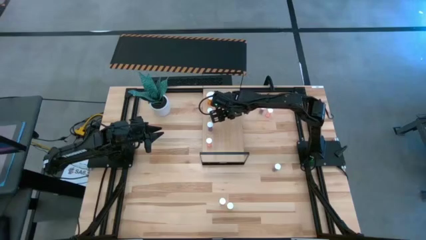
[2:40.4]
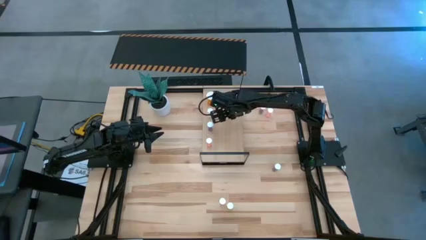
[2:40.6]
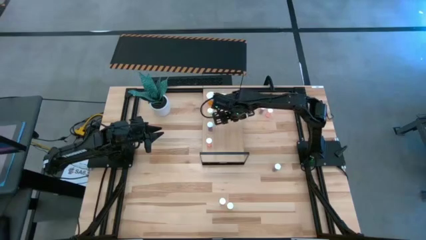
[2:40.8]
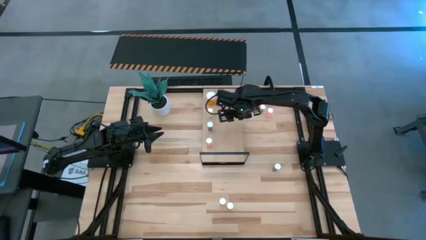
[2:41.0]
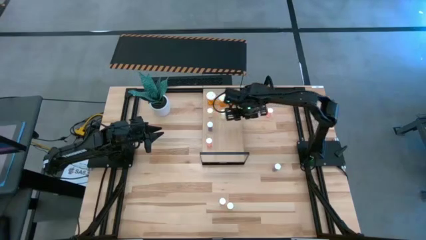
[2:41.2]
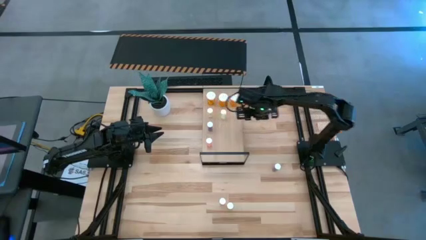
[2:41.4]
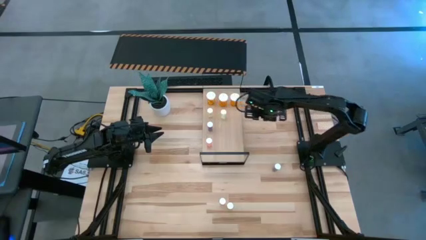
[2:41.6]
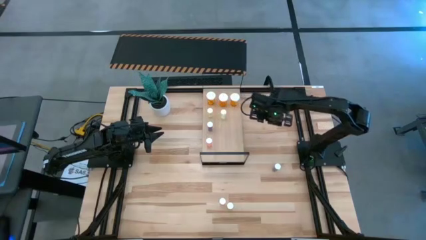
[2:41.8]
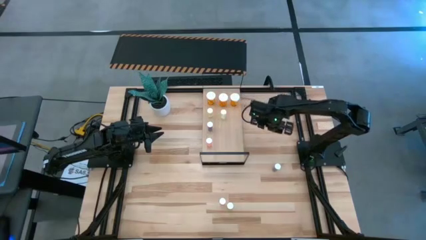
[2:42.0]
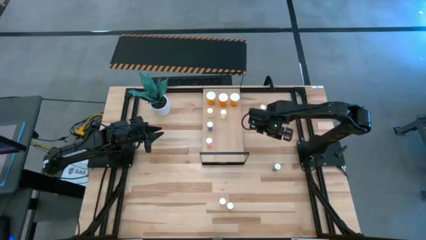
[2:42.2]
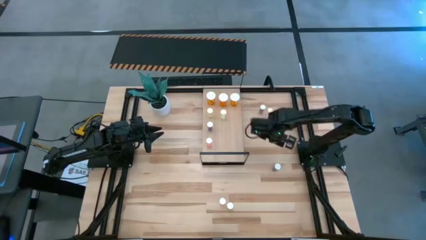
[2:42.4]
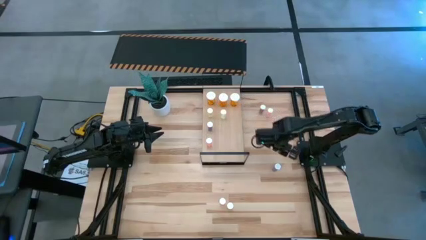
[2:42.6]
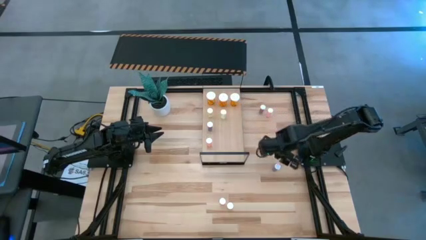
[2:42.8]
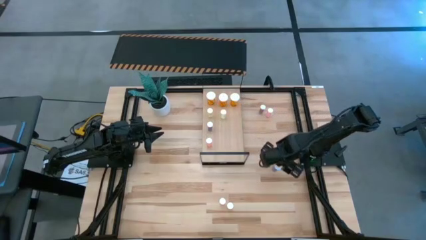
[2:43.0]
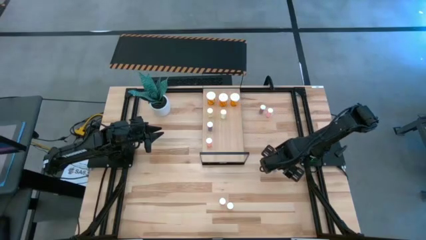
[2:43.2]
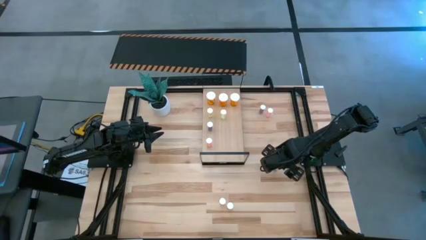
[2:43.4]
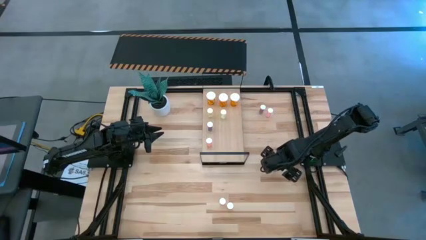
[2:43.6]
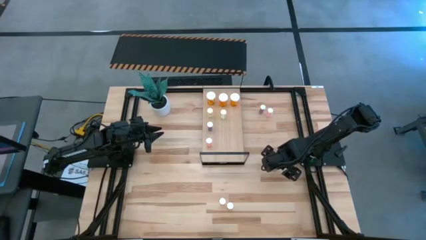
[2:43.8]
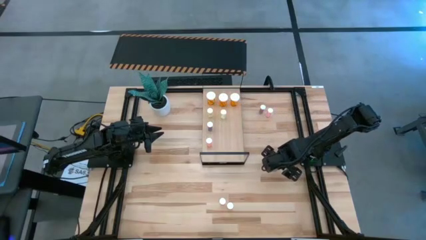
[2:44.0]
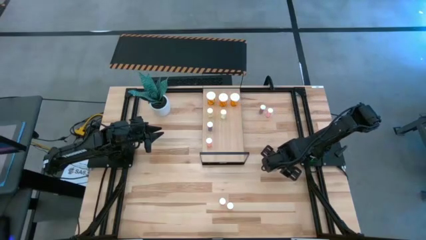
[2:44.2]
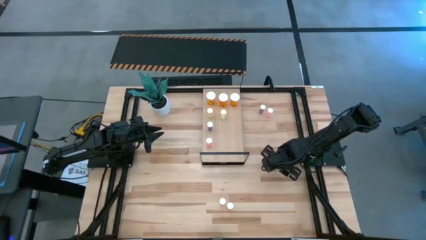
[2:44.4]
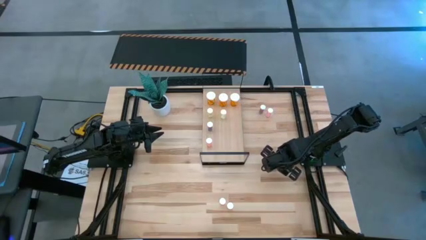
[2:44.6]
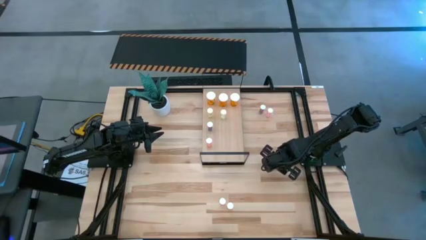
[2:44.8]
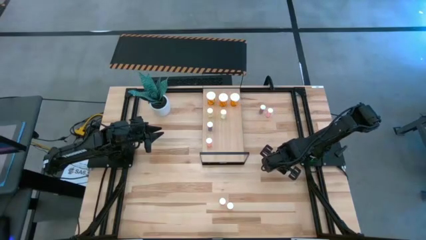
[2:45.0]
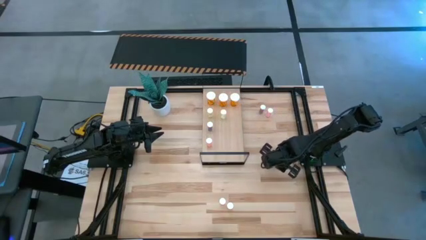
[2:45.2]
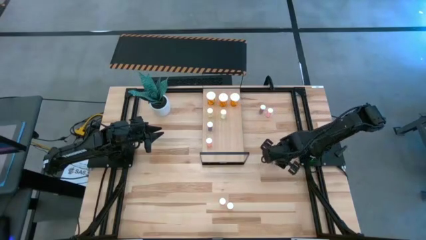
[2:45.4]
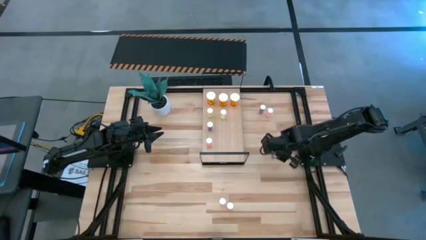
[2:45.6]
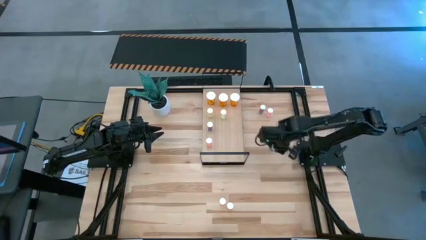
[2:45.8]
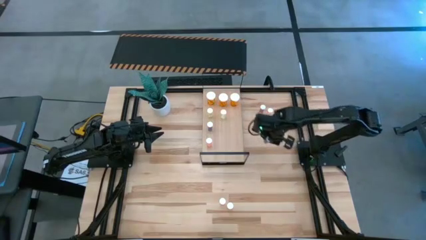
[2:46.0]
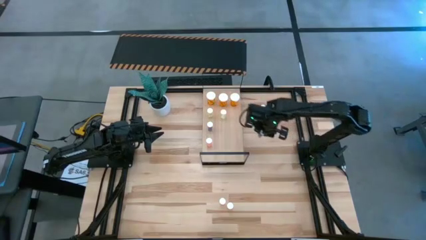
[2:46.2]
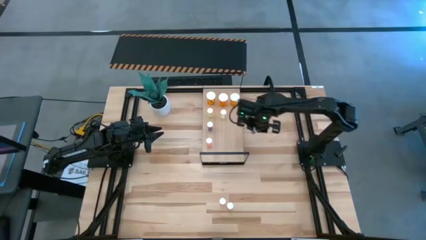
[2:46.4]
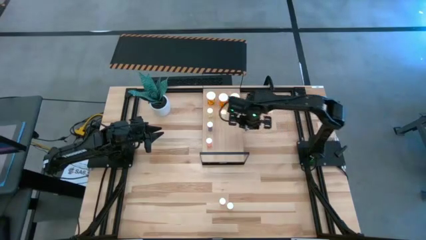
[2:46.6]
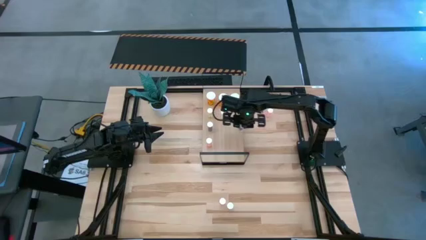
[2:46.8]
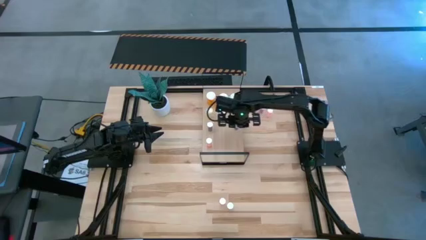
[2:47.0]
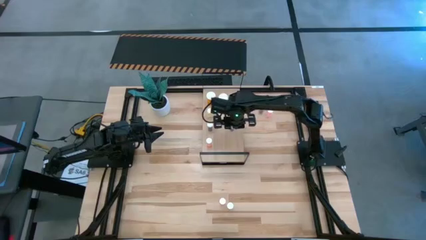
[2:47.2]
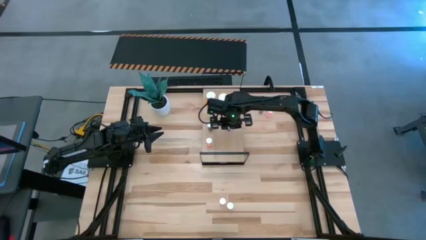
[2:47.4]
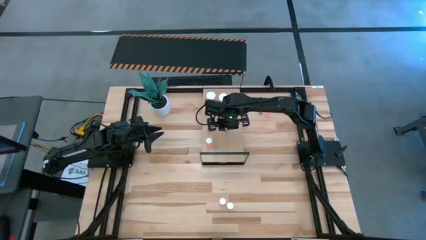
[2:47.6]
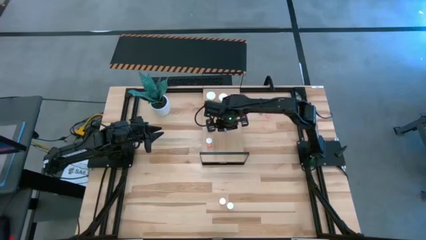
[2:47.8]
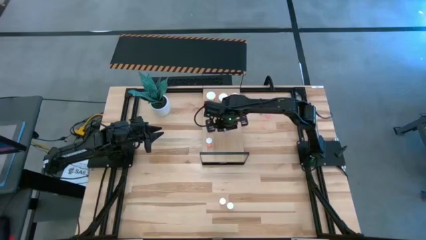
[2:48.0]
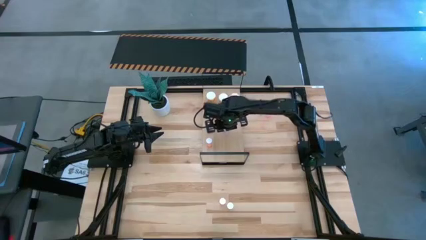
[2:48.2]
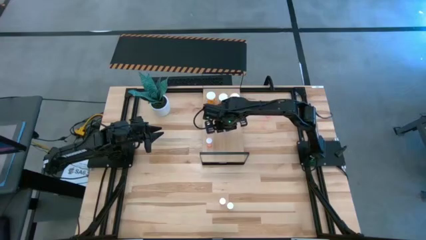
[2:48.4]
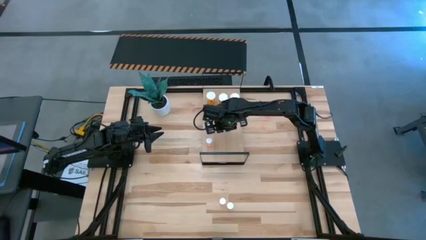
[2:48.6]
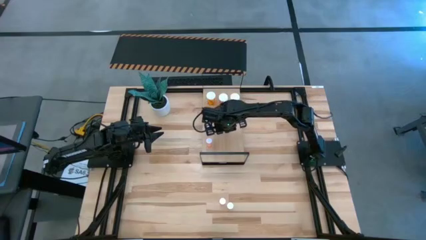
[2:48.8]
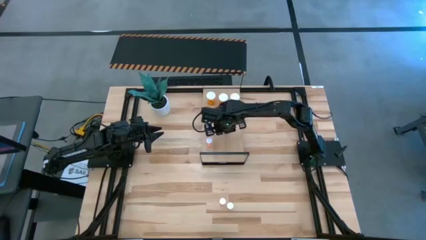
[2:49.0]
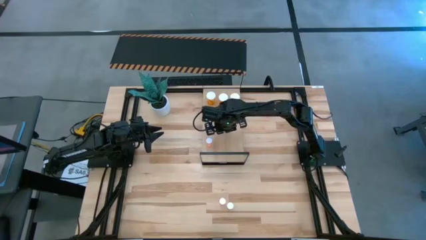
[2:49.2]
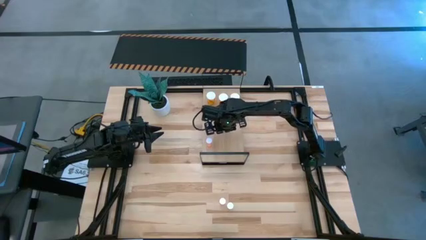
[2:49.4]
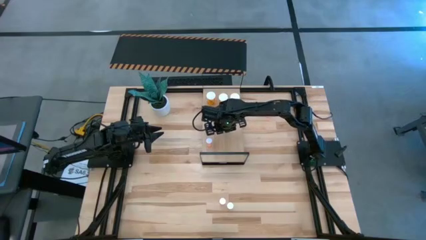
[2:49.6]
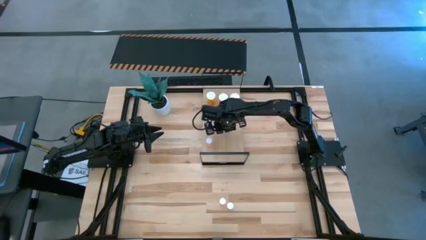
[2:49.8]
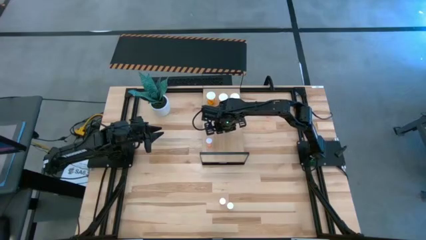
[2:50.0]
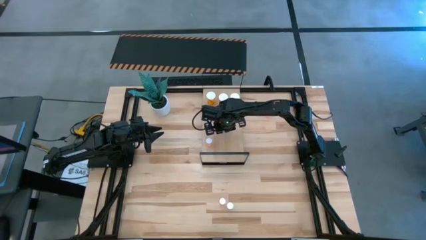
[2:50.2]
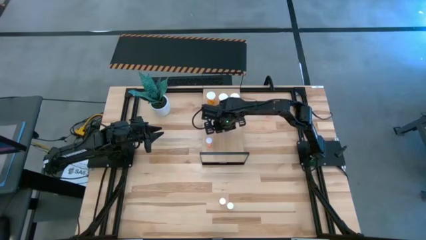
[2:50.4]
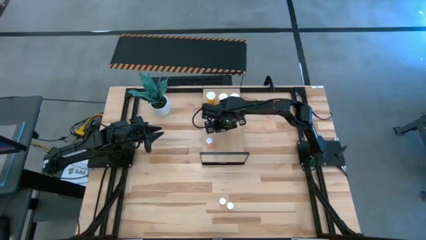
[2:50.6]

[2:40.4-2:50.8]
Task: Pick and place medicine bottles onto shelf by color
Put the bottom small blue pill bottle on the shelf aligned with the other small blue pill bottle

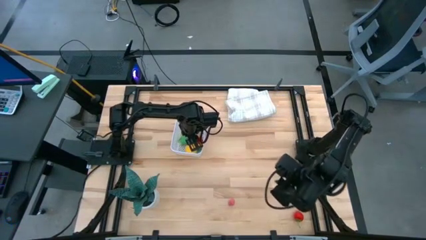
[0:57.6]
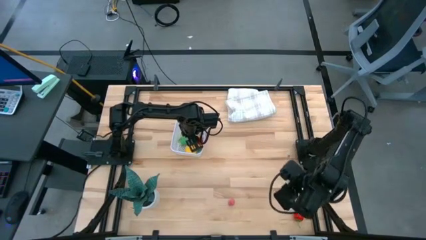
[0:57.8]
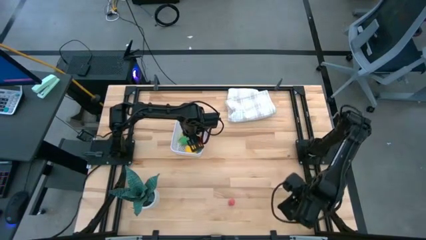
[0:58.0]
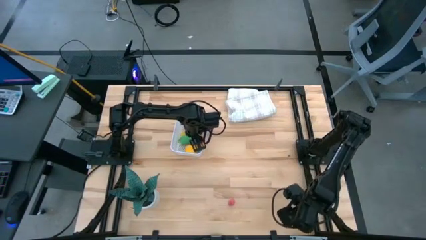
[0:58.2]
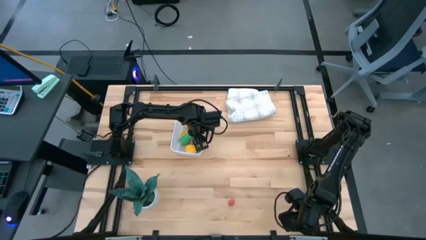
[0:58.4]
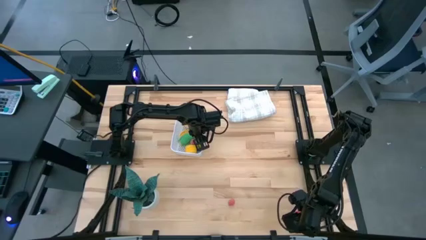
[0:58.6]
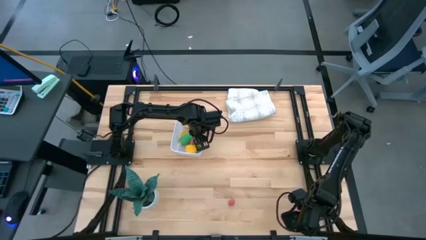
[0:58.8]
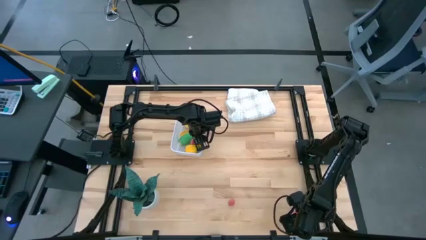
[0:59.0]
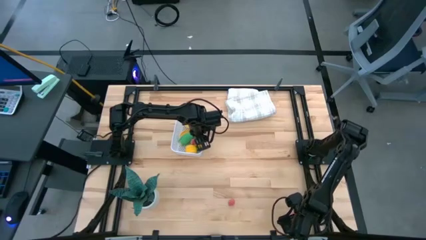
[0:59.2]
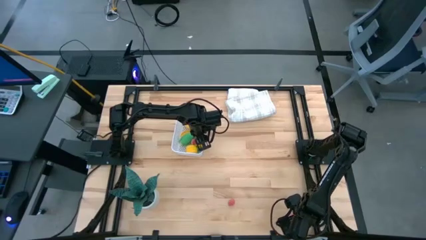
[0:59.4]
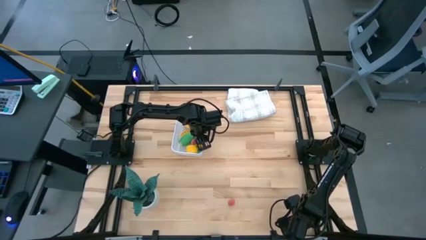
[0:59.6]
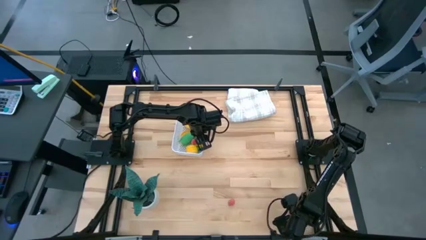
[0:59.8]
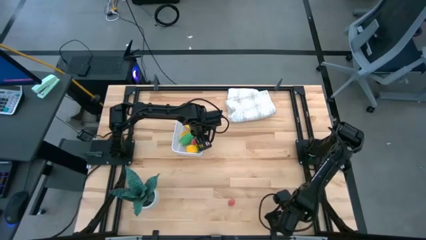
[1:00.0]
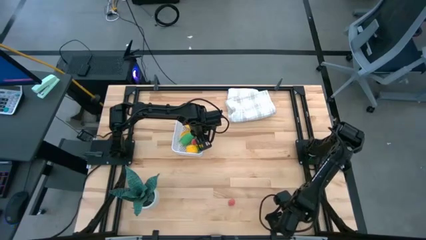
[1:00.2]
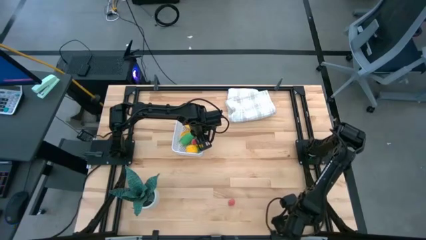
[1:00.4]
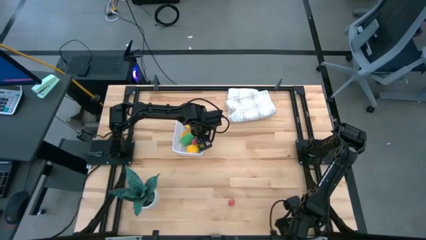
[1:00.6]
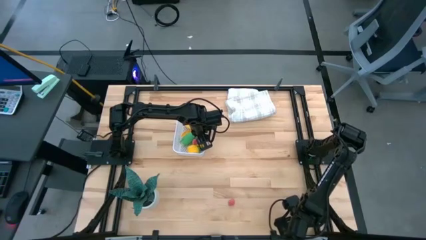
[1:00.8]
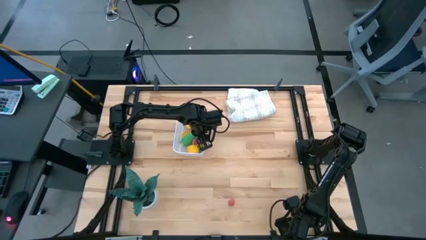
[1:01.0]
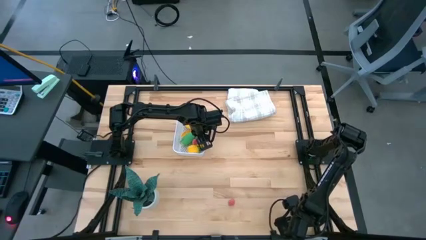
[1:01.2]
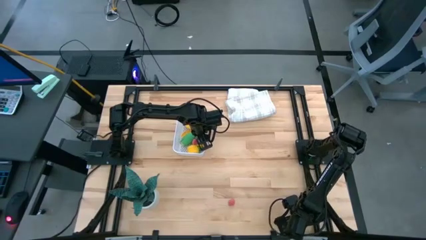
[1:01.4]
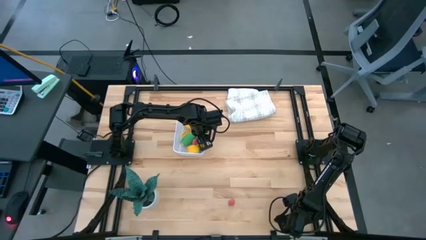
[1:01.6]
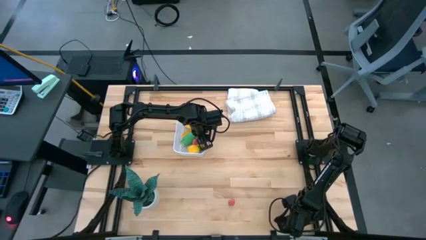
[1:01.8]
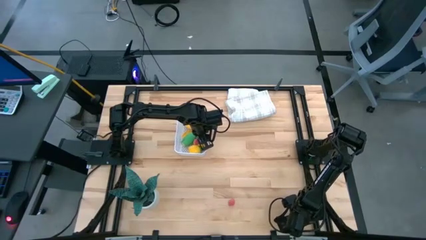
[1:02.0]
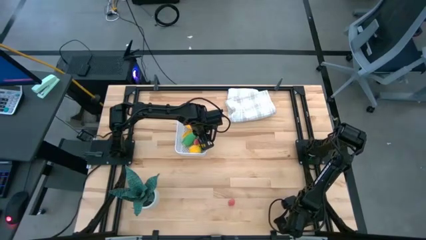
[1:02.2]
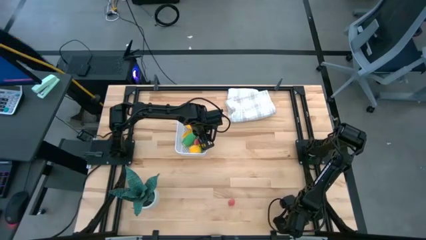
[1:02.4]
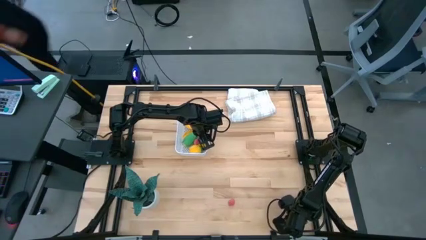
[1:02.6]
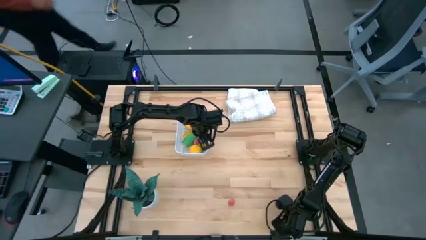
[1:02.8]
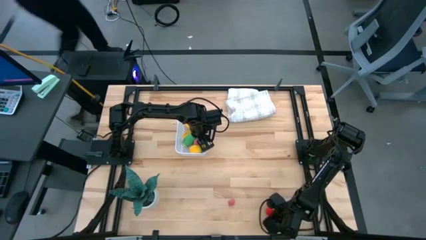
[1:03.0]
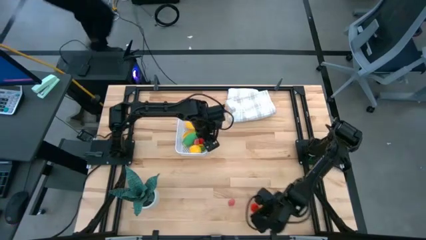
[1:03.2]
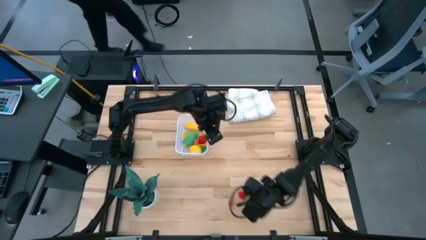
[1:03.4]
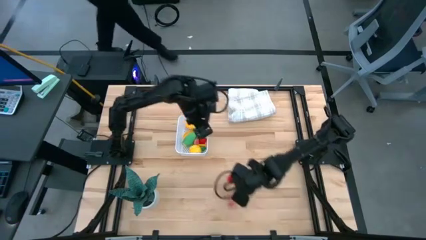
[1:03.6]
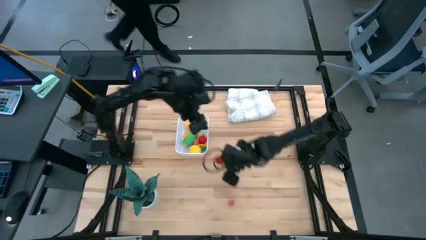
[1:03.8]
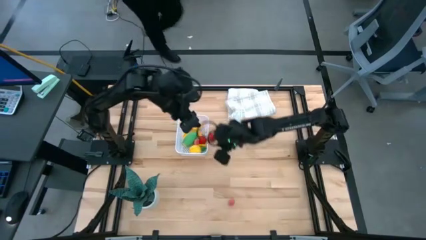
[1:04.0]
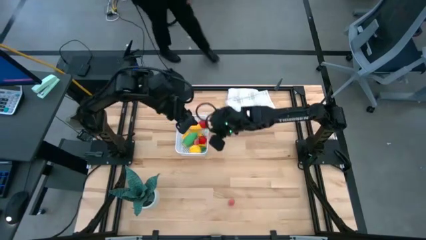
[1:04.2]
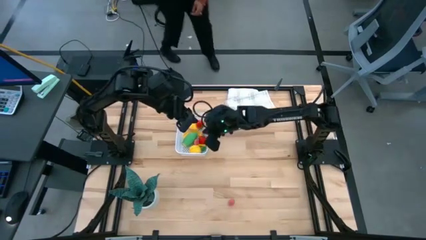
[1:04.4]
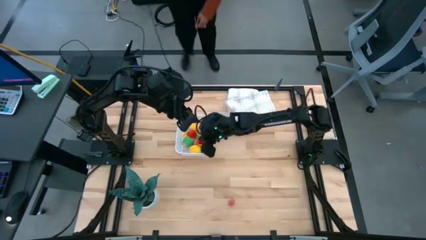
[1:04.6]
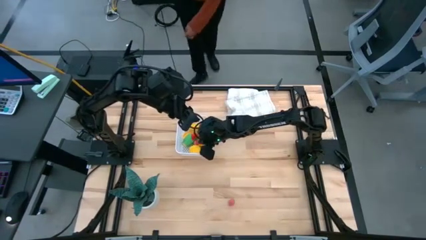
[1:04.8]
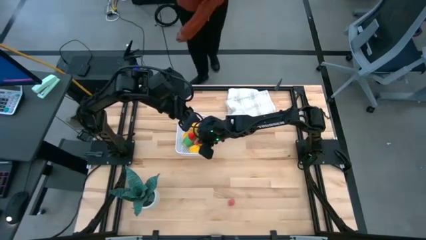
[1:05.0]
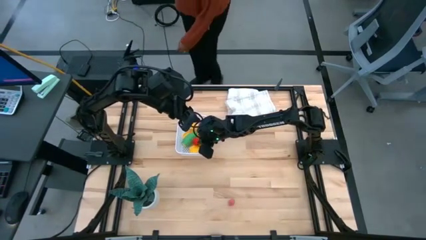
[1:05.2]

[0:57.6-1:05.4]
Task: Pick and placing Produce into tupperware
Put the strawberry into the white basket
